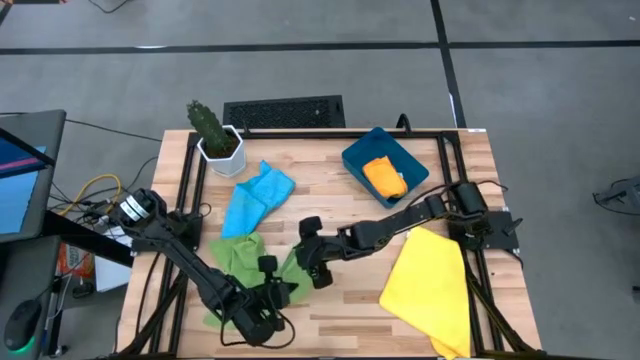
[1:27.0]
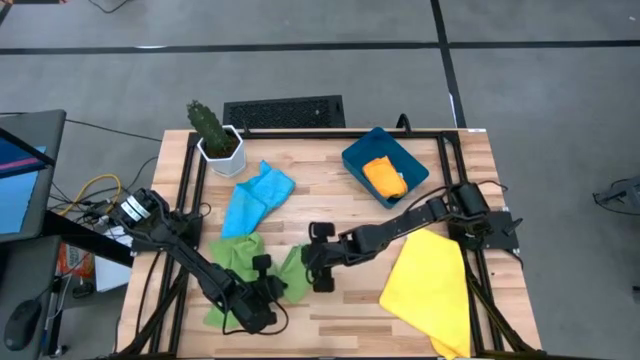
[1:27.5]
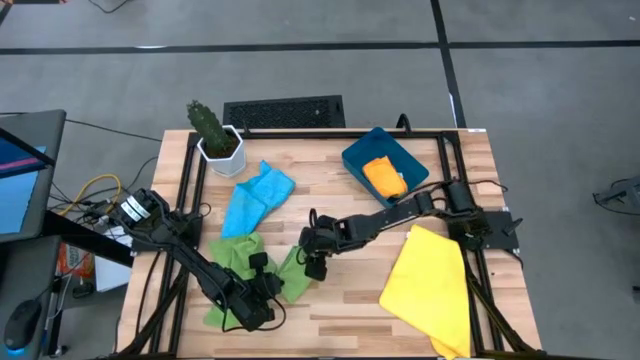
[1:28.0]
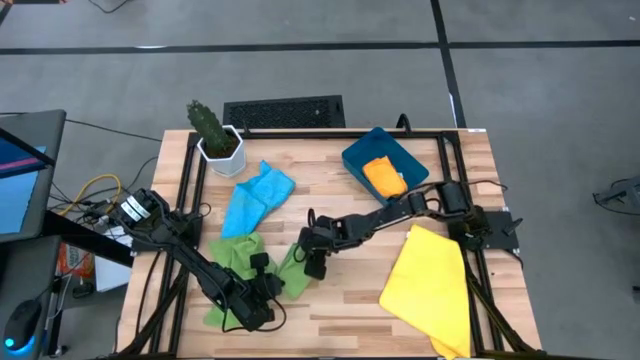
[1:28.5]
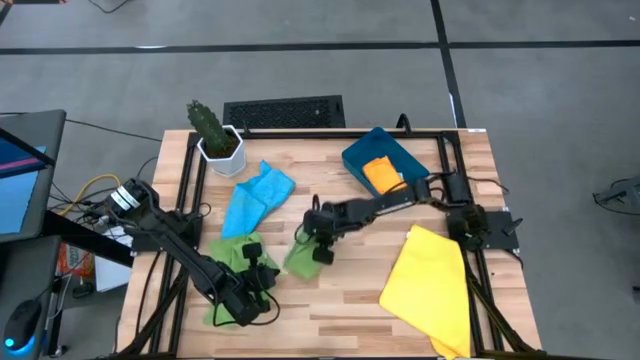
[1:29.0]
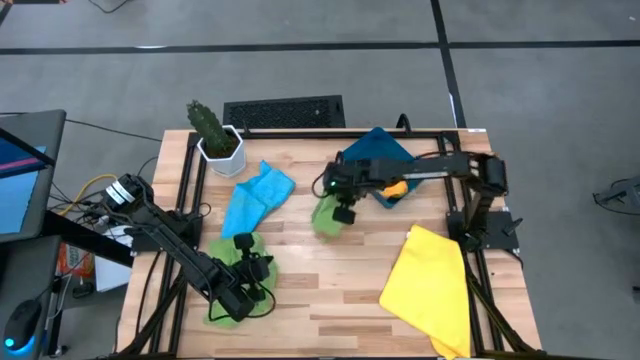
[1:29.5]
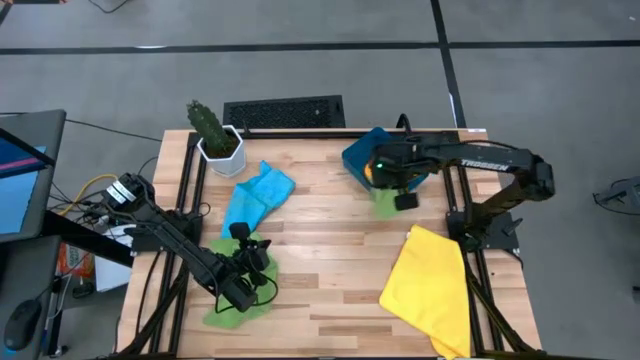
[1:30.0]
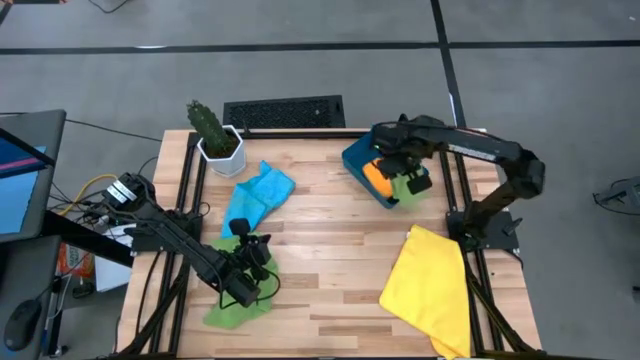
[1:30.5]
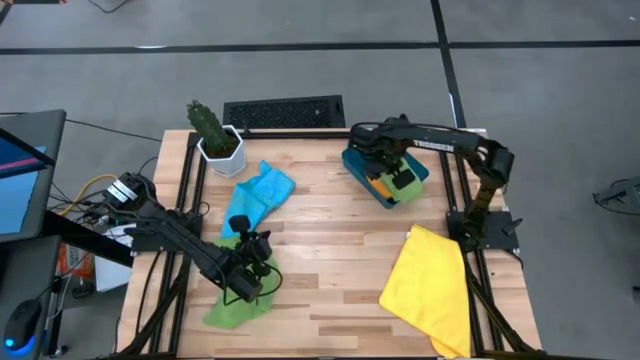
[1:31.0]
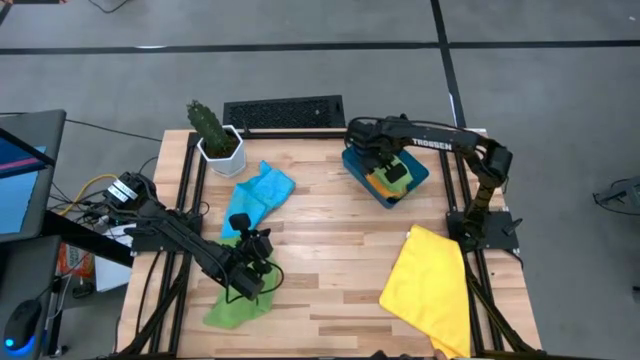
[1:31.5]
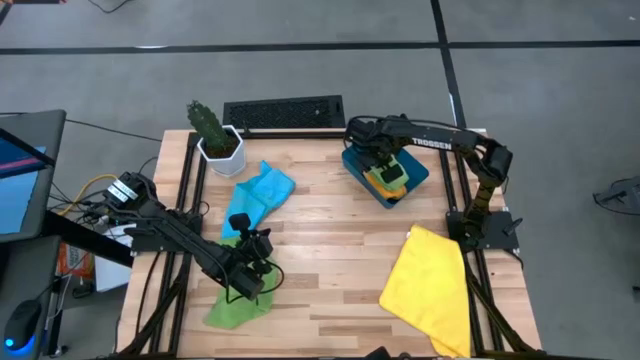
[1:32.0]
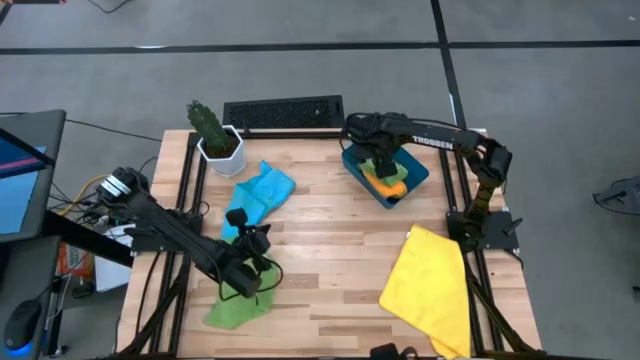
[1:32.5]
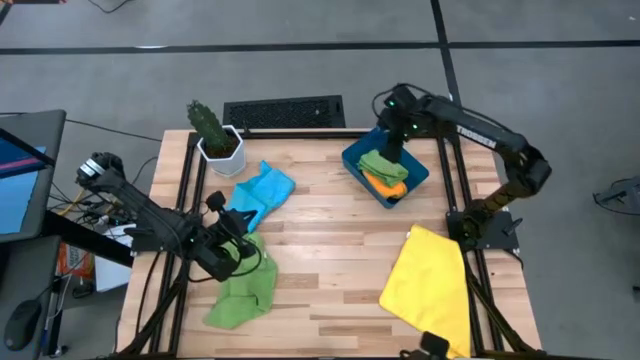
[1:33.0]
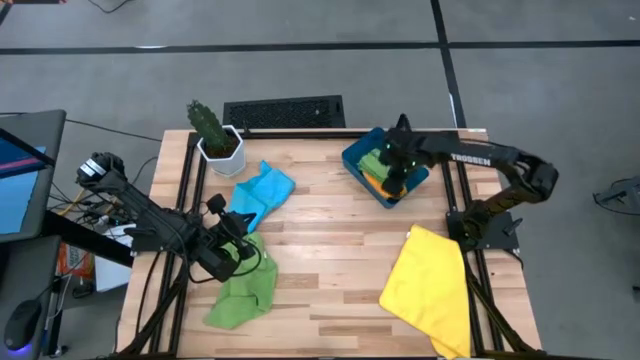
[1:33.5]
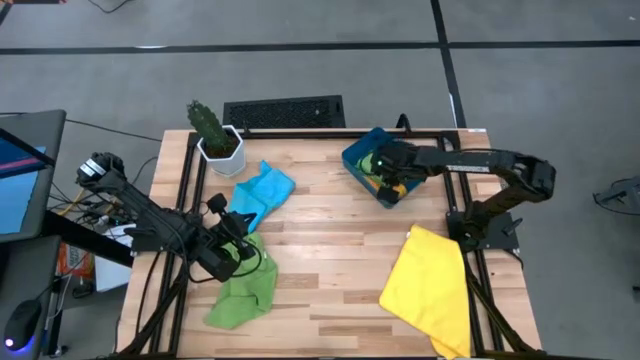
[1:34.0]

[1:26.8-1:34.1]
Task: Fold microfiber towels
Put the folded green microfiber towel into the blue bin

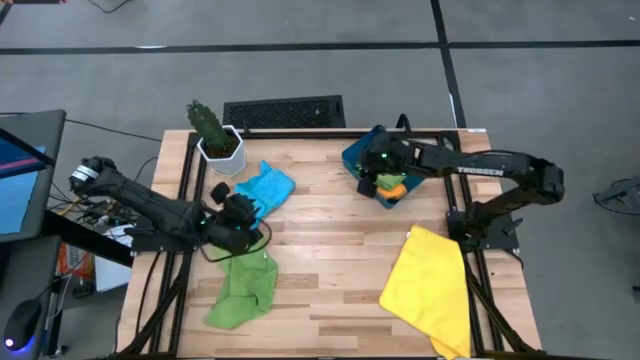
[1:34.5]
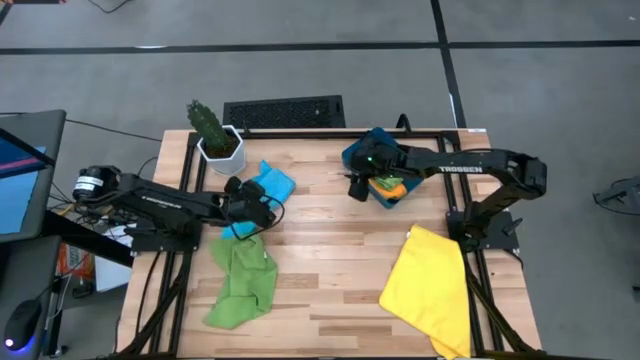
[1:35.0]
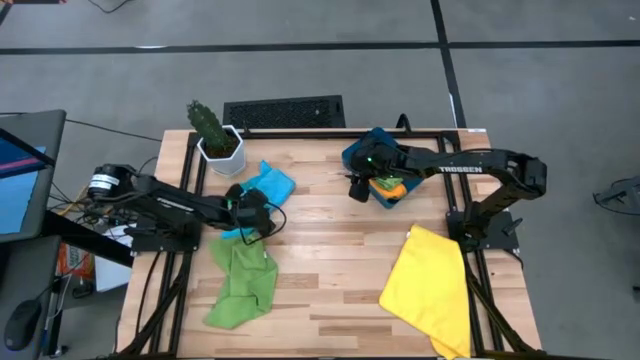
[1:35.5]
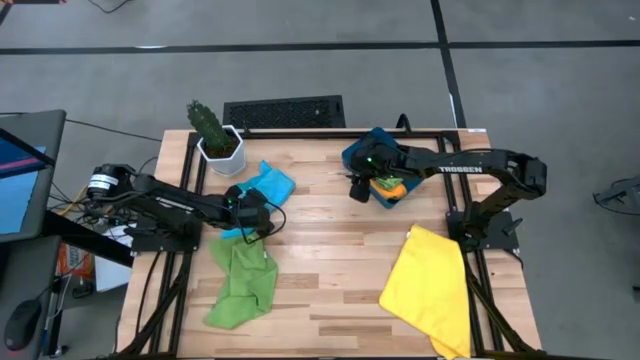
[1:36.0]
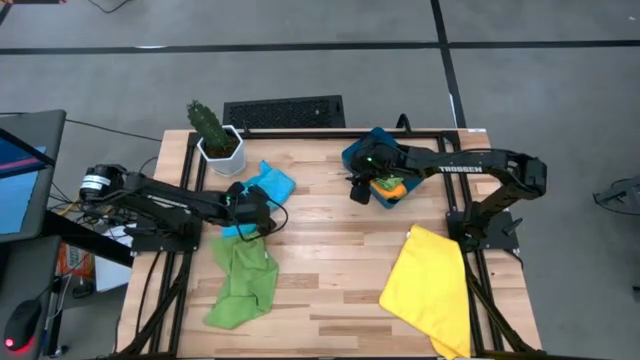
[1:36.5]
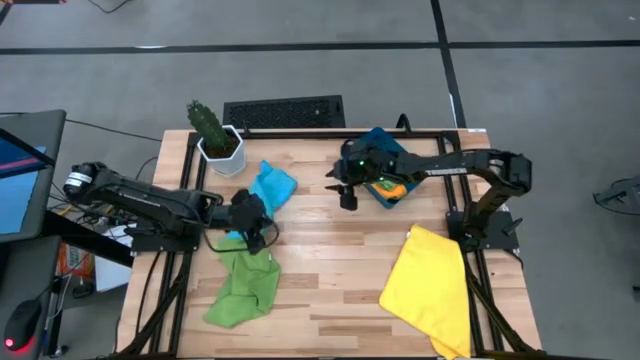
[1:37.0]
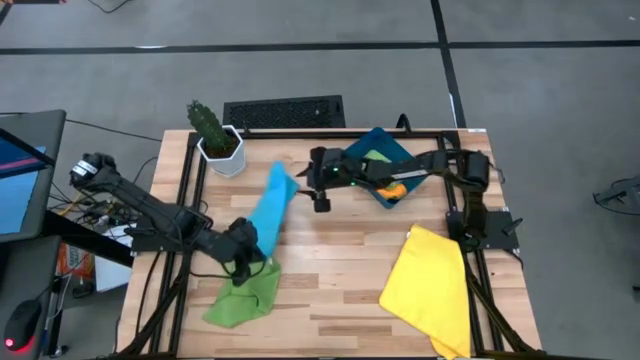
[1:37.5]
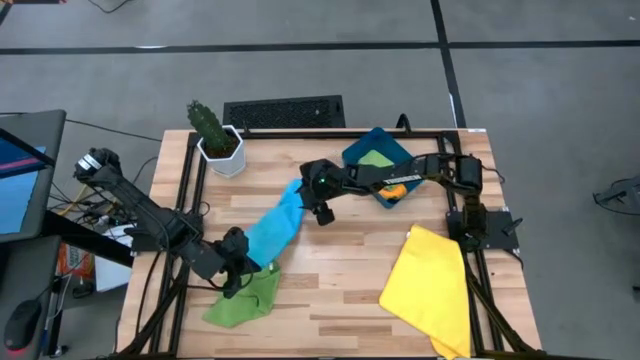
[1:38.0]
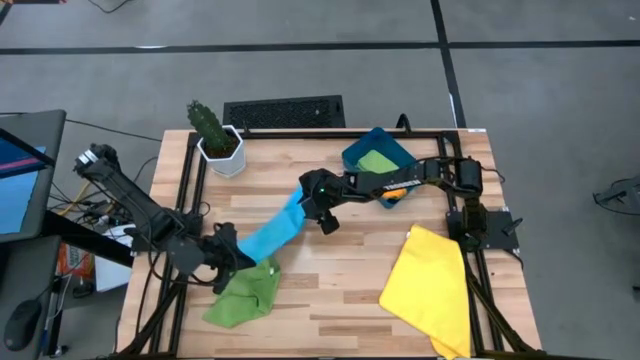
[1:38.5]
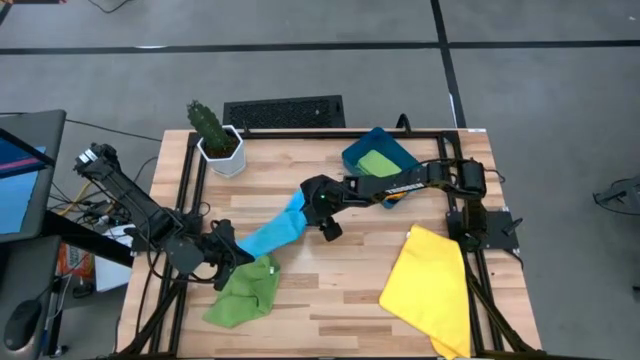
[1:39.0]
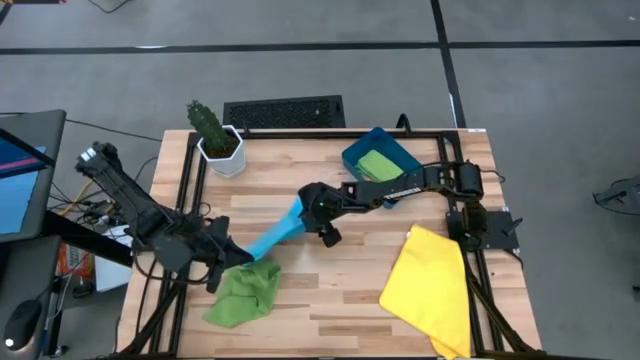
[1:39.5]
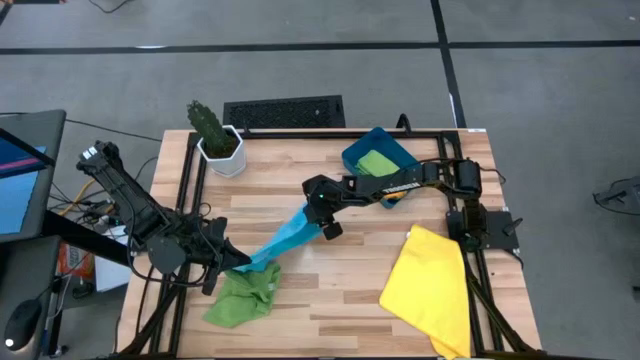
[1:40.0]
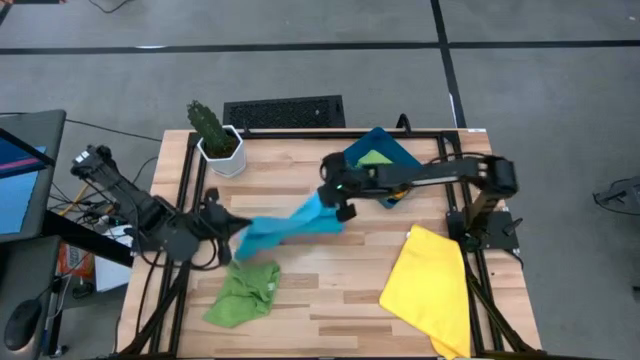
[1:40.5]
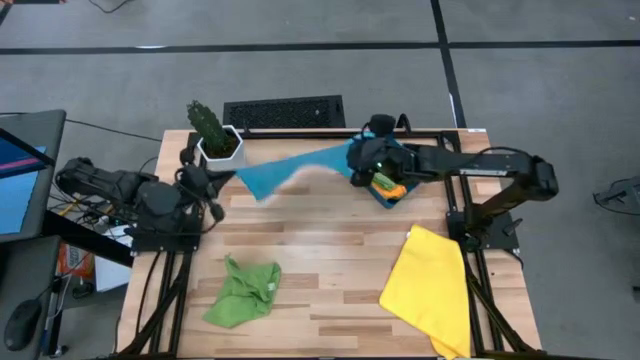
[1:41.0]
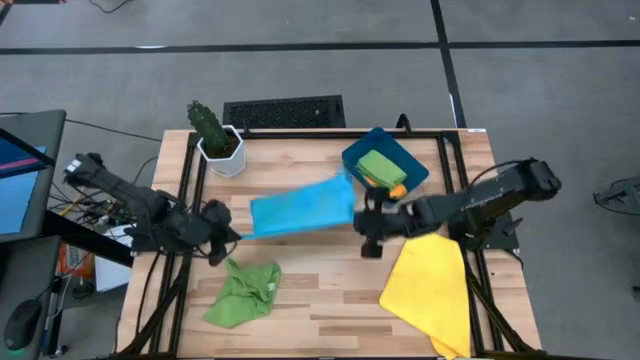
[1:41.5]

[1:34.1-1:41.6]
Fold the blue microfiber towel

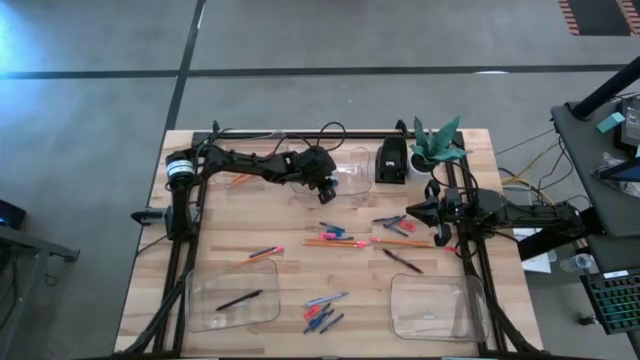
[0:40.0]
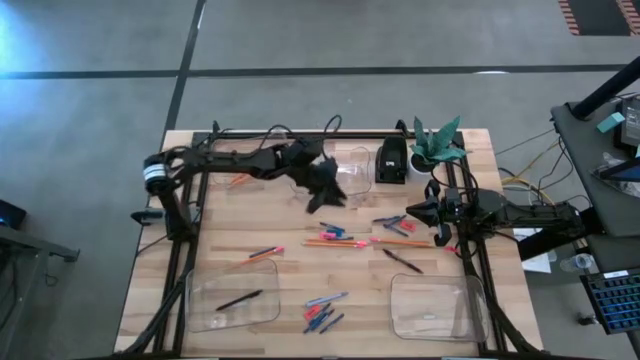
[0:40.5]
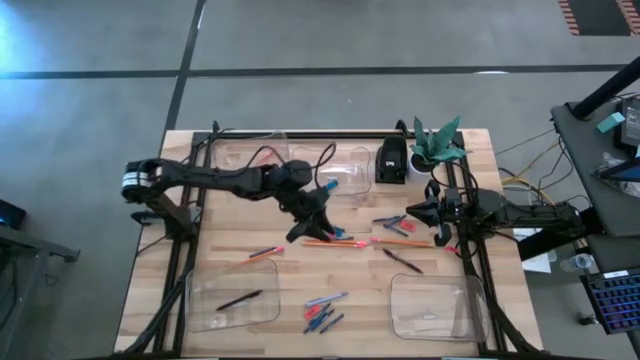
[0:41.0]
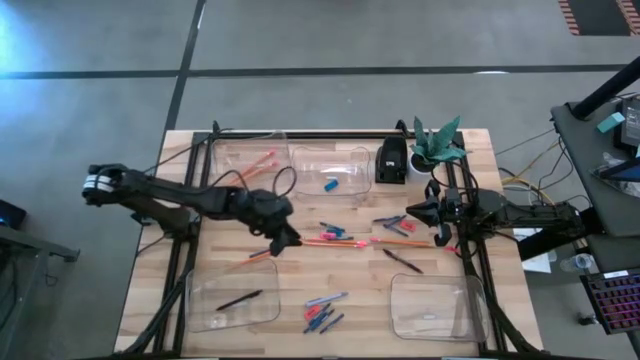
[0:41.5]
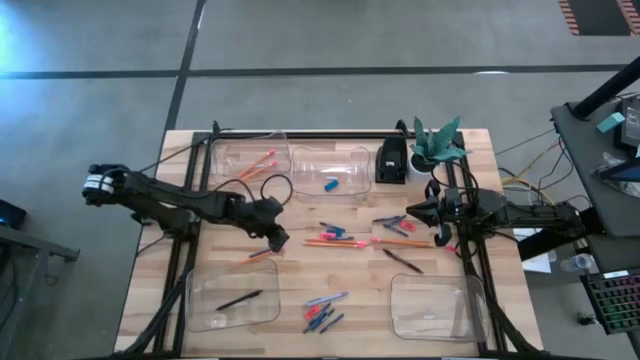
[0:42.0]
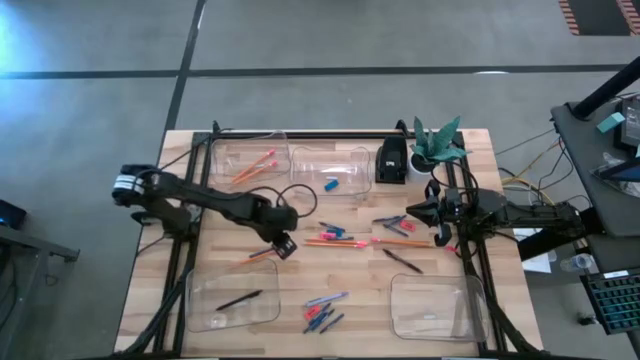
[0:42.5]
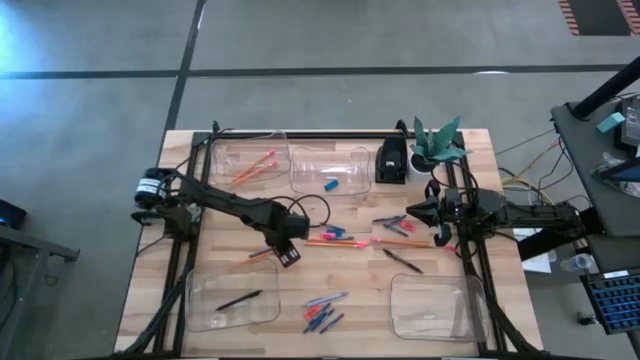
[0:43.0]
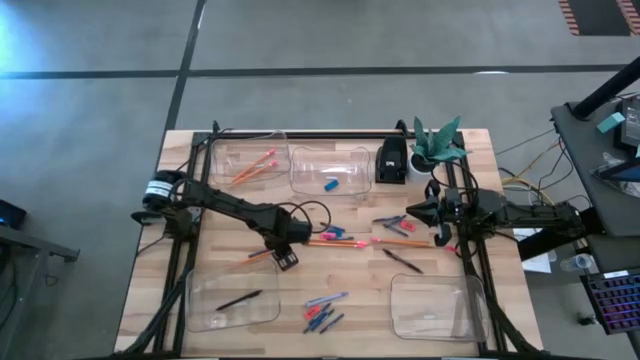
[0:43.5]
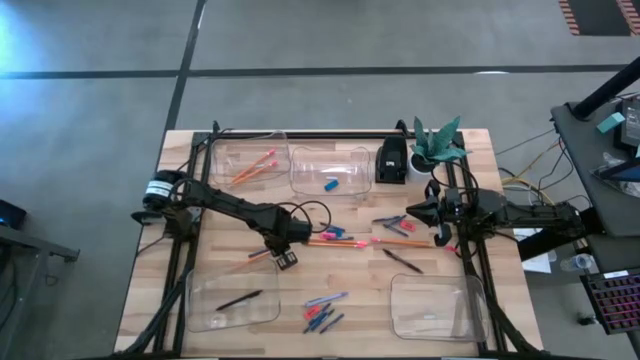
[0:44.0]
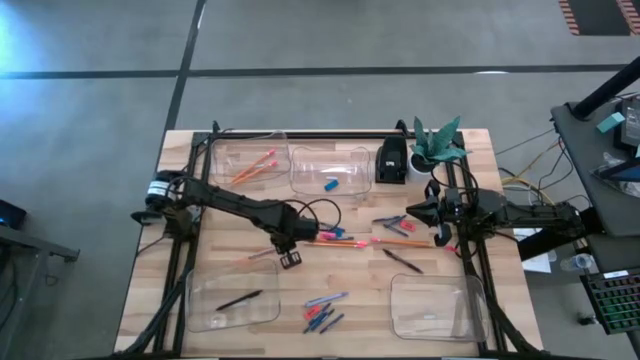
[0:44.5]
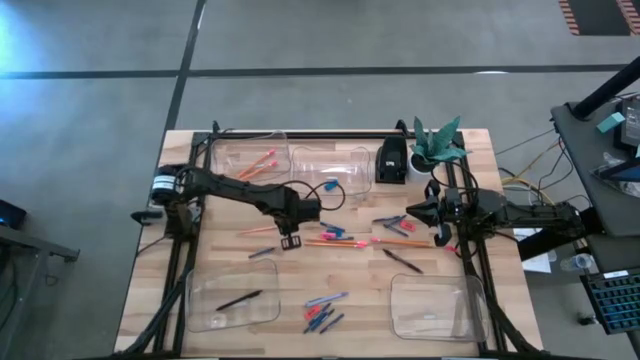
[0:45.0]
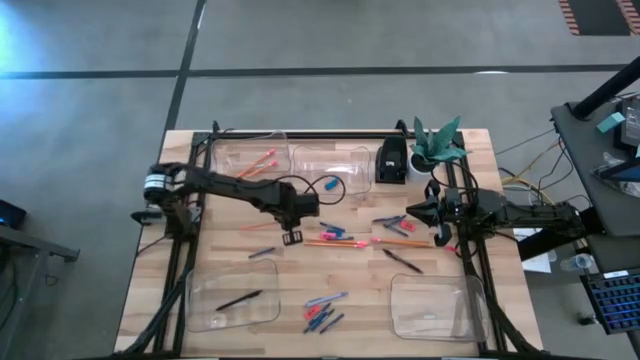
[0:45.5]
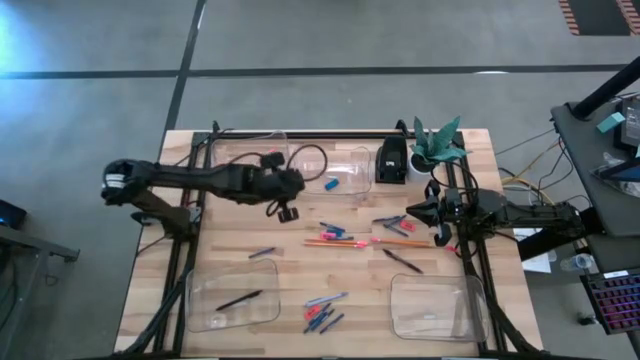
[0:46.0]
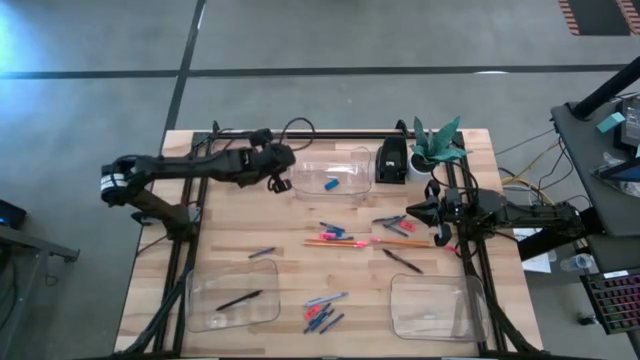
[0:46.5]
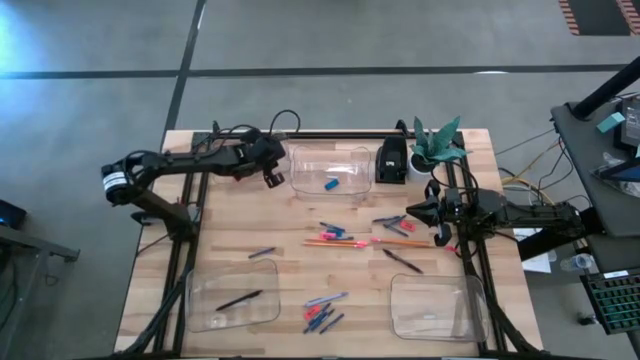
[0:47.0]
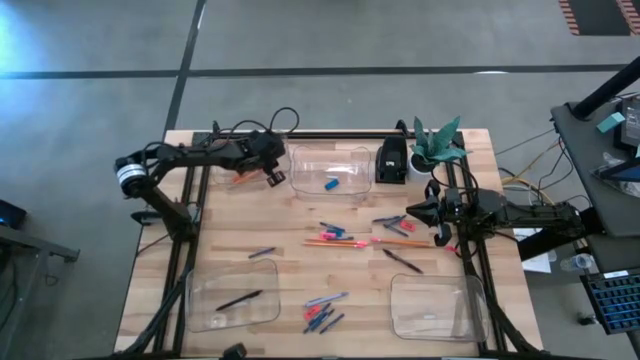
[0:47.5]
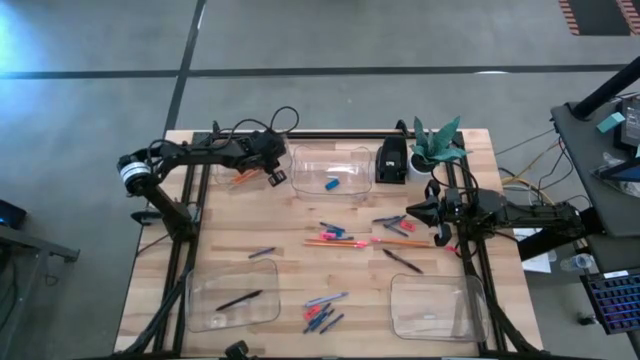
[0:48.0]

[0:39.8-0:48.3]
Task: Sort crayons/erasers/pens/pencils in bins
Put the orange pencil into the top left transparent bin
